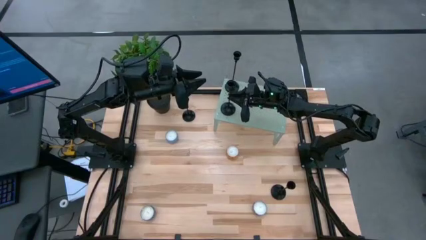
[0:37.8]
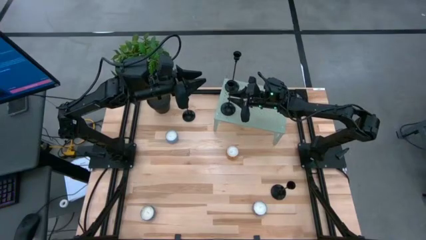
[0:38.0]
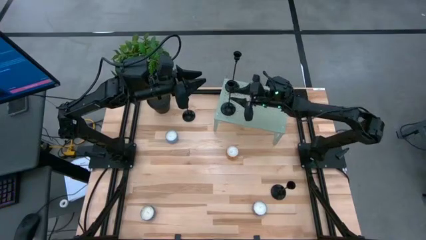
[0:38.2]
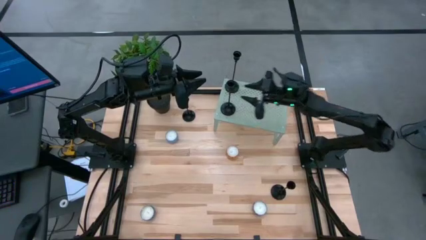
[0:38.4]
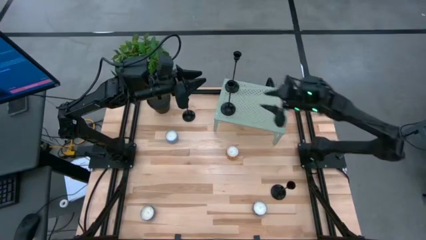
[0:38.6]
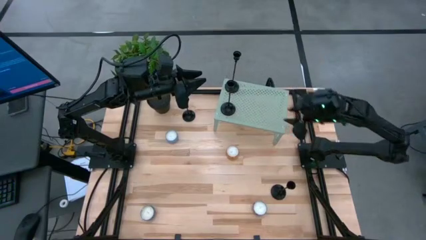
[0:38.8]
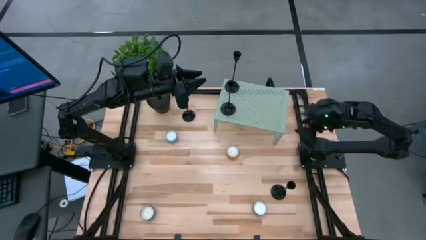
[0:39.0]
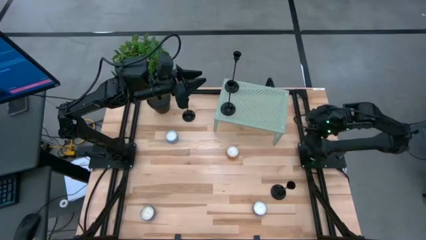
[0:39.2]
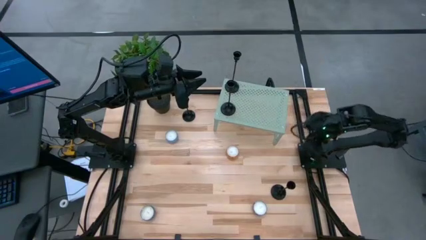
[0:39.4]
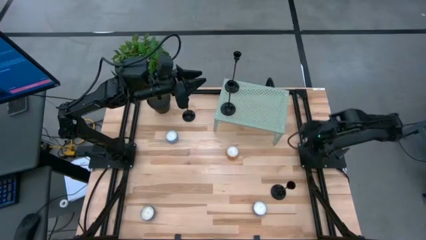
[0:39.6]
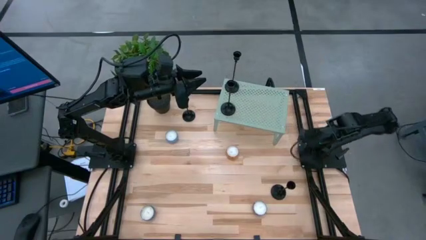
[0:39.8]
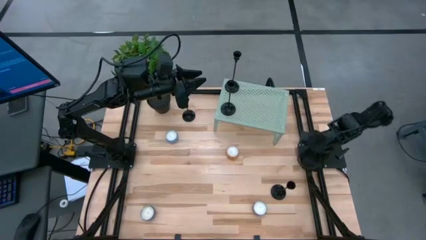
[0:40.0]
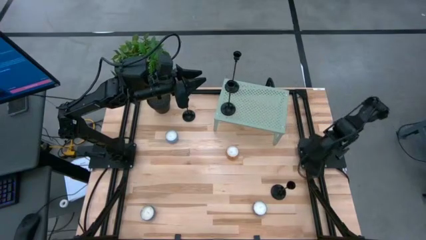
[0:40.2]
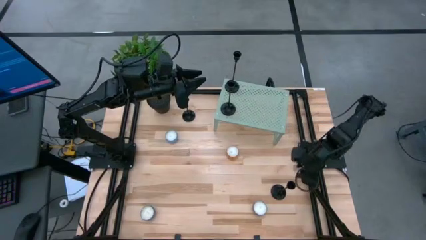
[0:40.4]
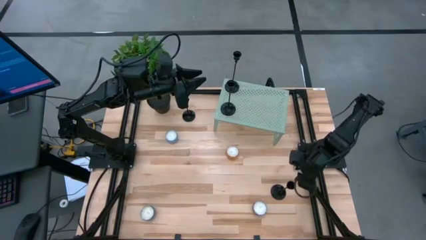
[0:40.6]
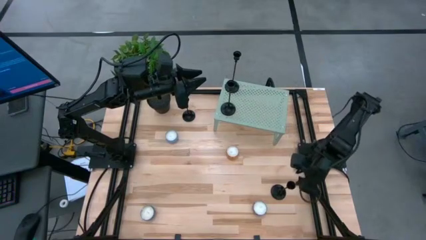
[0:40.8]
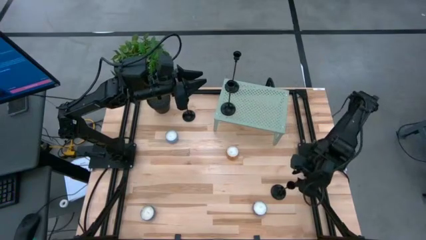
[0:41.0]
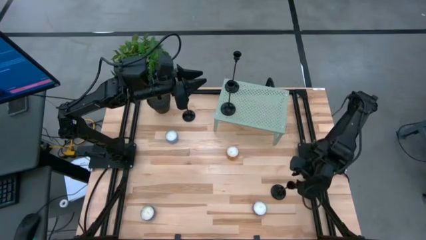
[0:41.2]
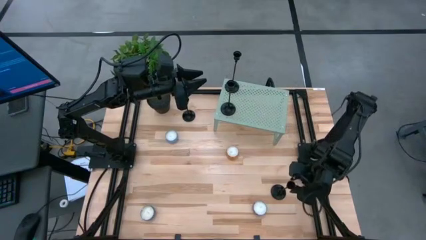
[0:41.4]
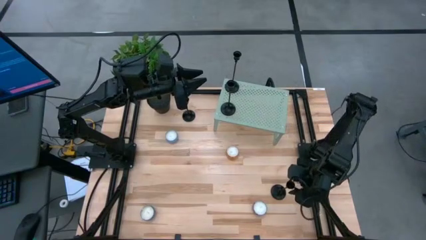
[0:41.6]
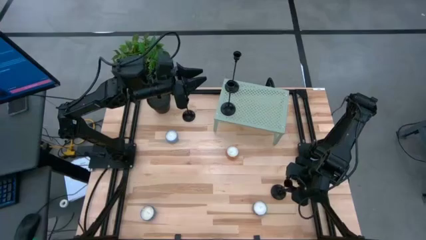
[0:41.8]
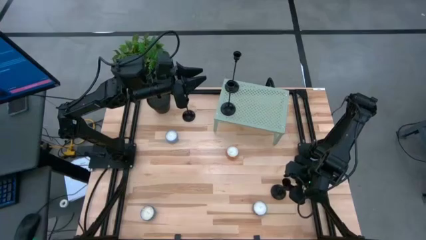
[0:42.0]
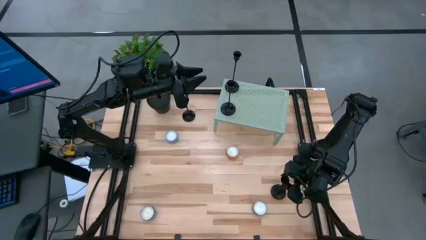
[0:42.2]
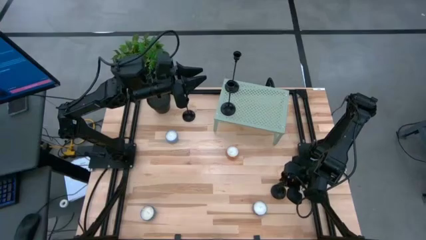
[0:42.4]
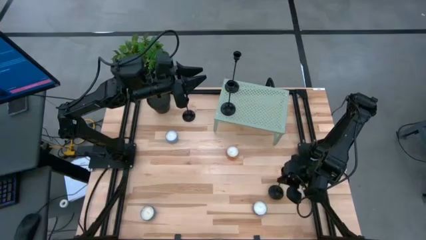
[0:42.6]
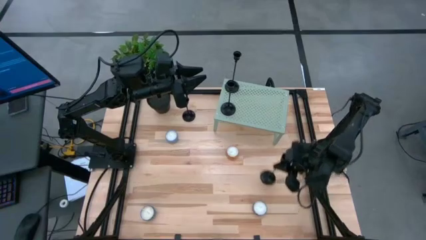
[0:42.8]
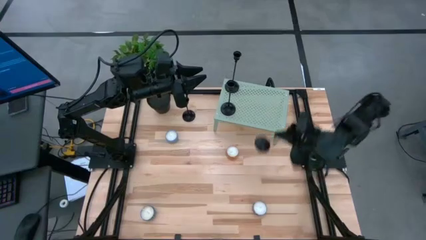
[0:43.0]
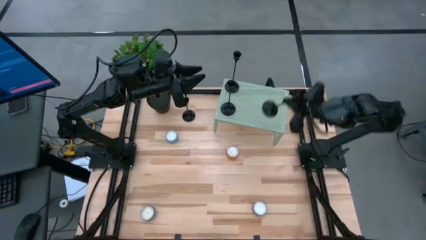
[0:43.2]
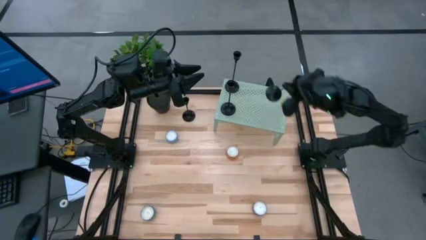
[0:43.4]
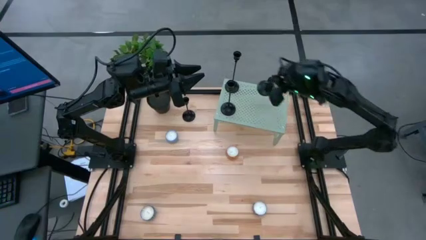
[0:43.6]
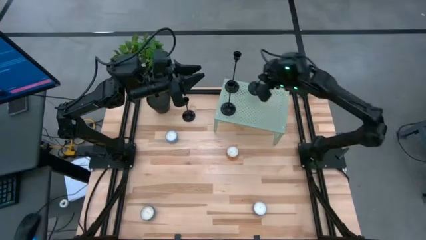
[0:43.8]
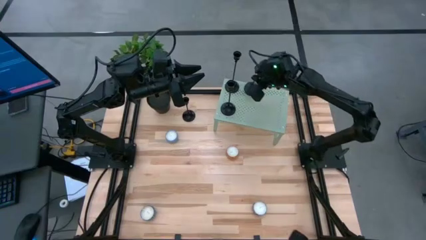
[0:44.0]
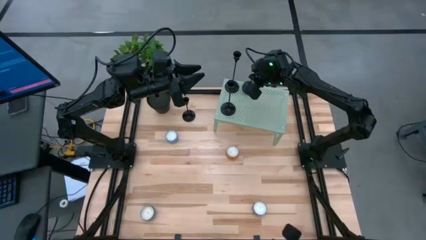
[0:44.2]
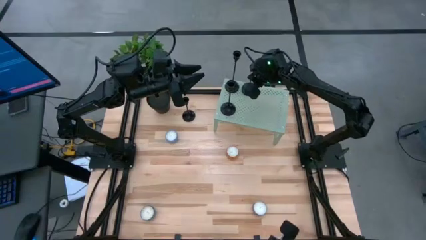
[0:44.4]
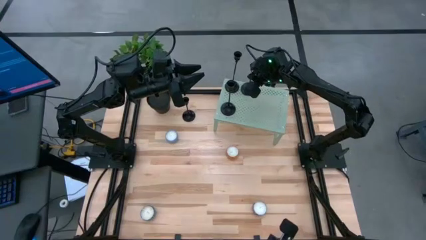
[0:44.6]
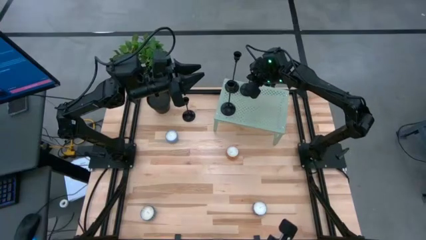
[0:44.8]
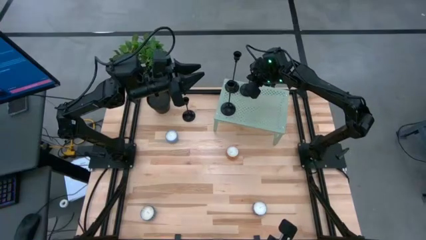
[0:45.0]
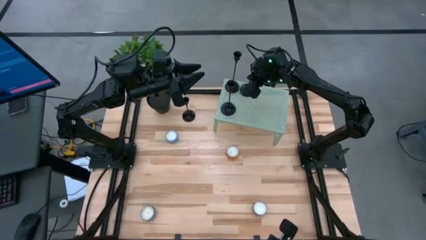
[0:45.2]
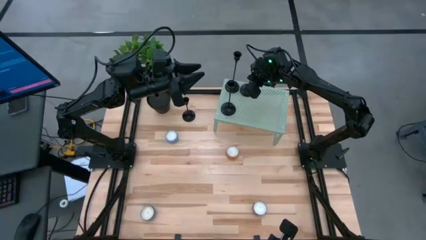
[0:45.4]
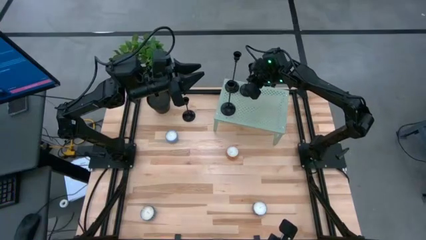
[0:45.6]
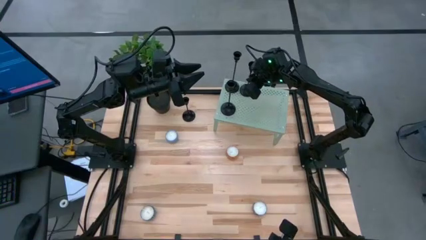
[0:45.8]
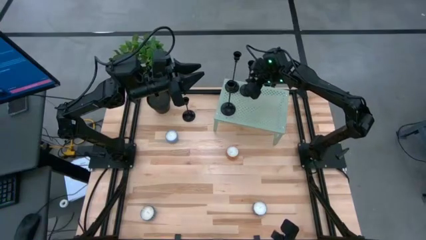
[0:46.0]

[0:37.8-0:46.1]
Task: Pick & Place candle stick holders
Put the candle holder on the shelf

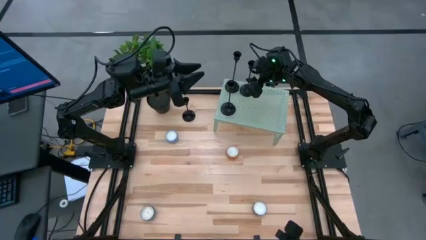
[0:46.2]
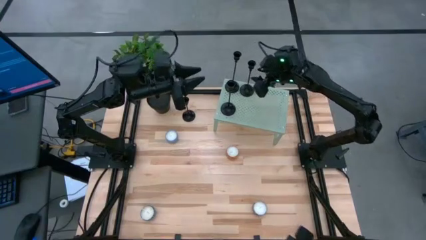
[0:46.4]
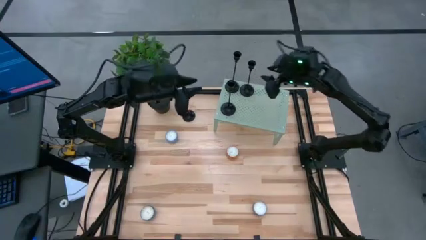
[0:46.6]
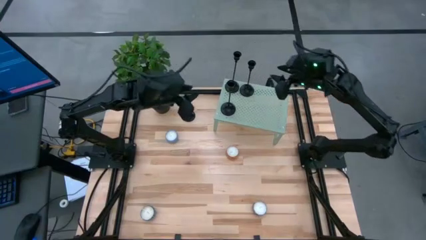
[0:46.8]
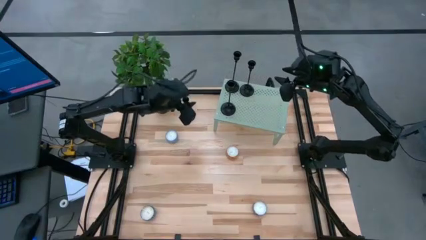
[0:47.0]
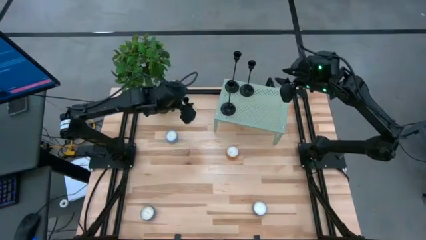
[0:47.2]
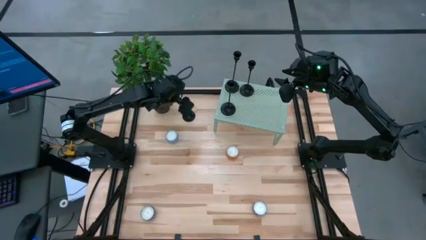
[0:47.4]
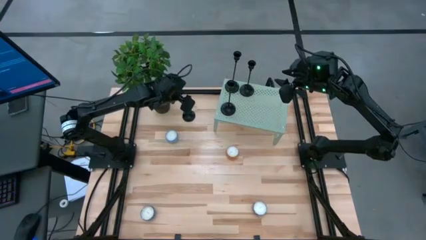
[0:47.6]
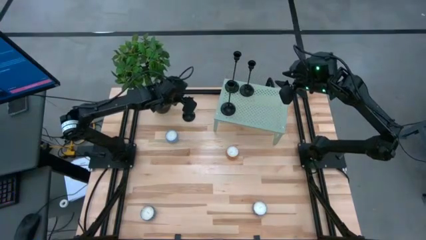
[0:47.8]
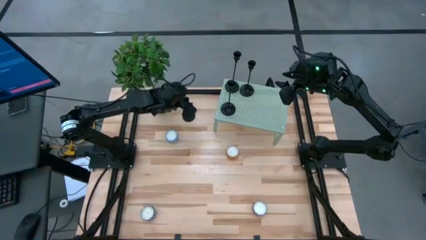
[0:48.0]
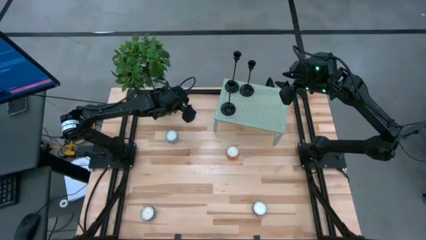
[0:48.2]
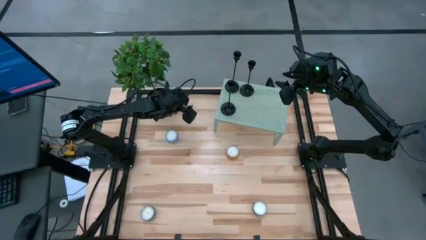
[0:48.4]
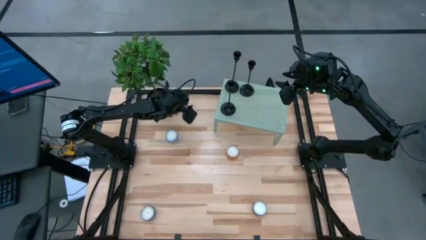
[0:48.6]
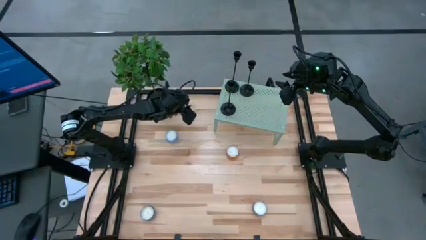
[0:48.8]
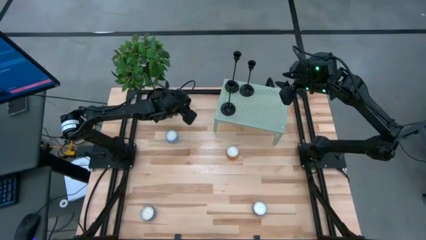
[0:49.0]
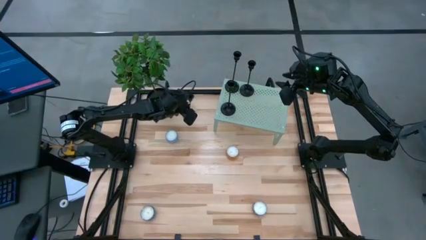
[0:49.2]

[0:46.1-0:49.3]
Put the candle holder on the shelf

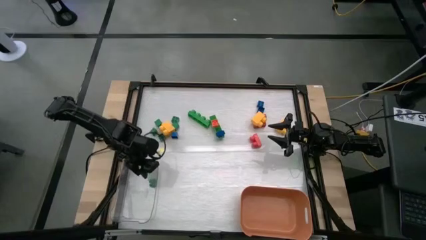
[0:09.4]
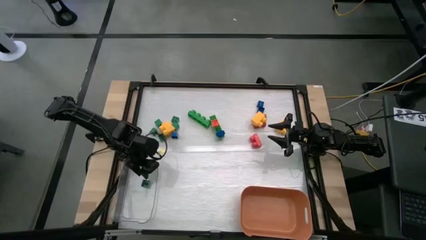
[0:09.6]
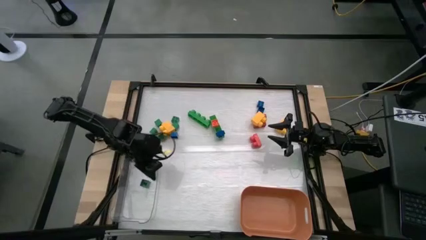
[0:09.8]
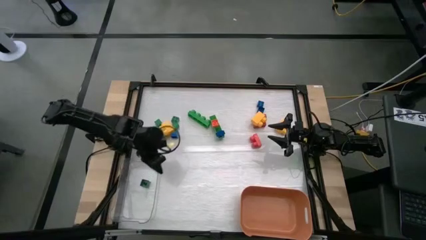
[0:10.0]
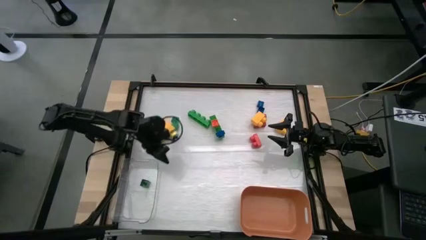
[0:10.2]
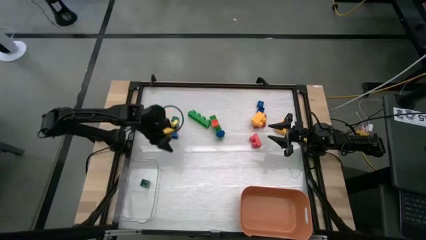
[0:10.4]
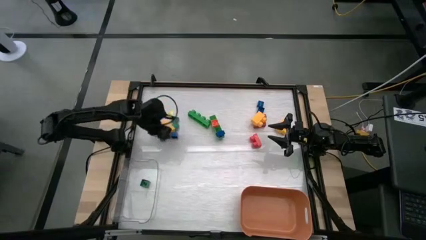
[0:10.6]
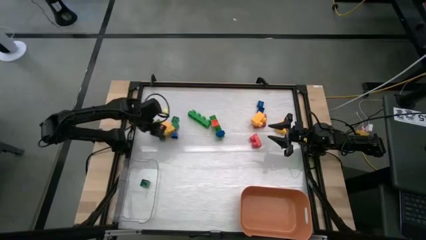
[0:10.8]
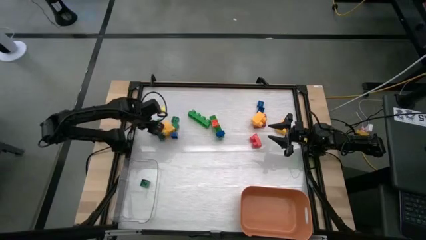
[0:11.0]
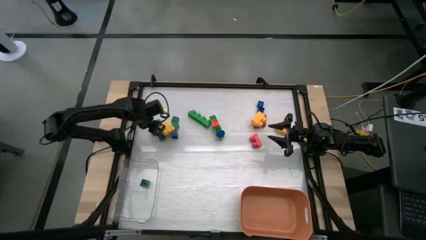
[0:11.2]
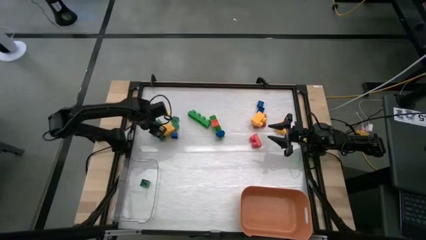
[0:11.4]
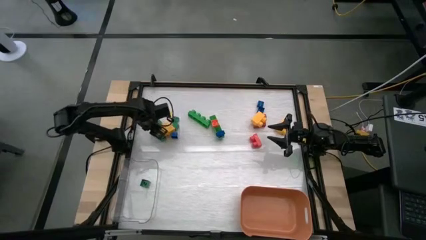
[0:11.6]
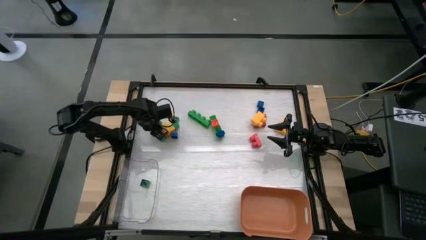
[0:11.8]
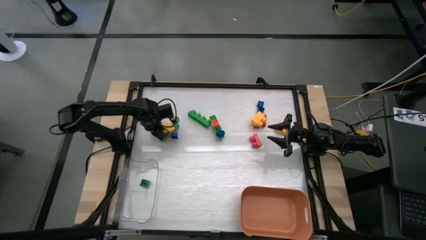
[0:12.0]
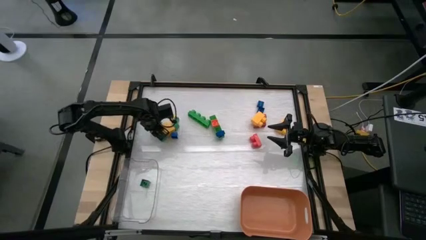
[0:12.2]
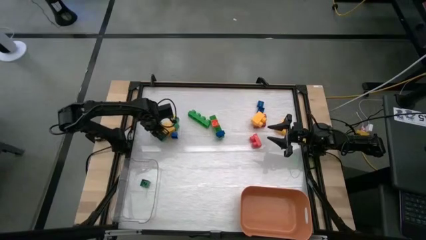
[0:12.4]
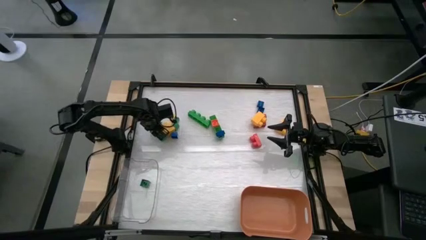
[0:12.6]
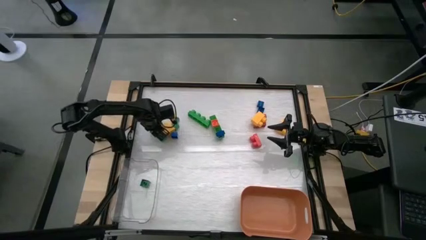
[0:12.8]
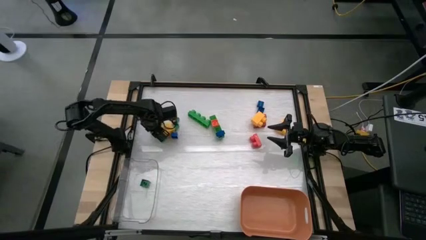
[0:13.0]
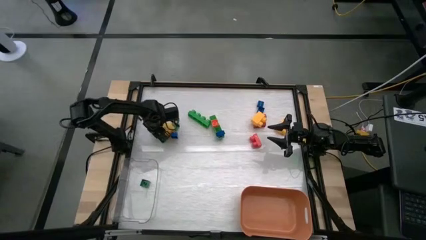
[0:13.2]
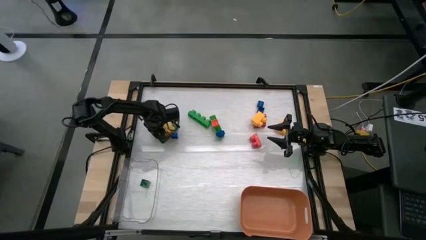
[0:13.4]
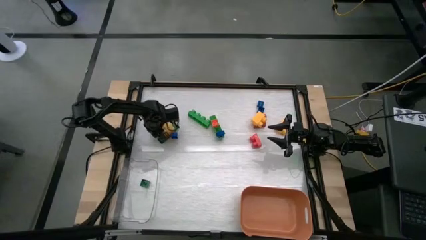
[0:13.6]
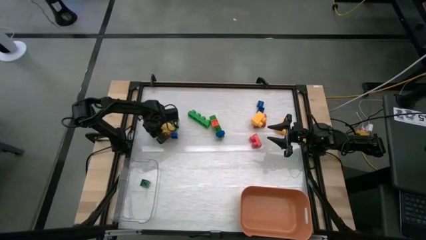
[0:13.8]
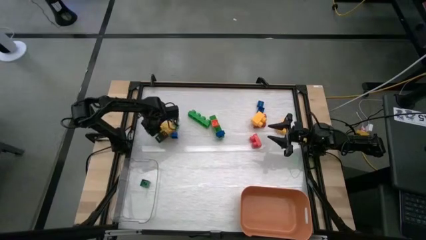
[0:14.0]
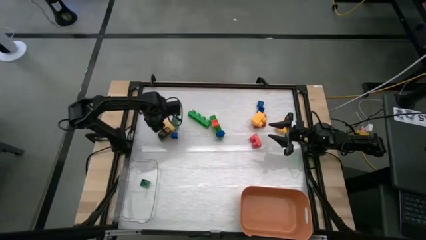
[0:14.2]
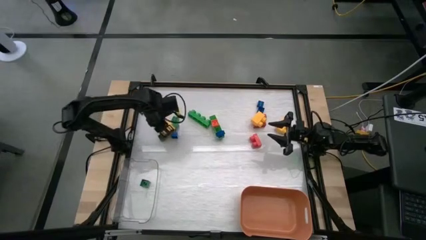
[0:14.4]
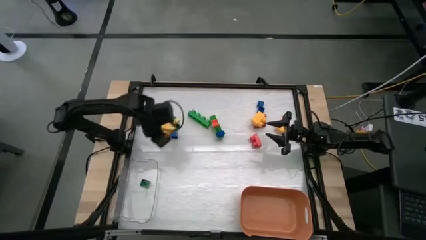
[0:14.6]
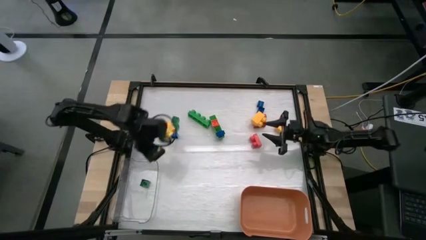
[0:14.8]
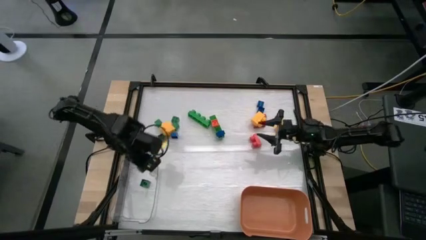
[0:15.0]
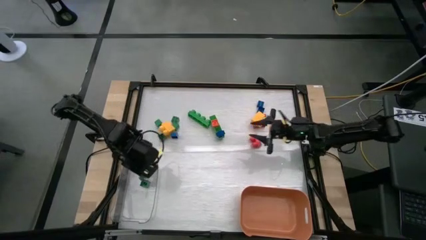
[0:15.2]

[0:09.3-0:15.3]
Task: Sort blocks by size
Put the small green game piece into the transparent bin
